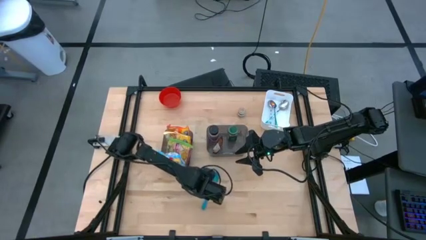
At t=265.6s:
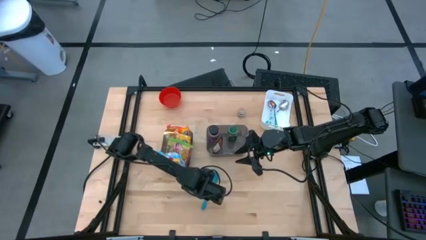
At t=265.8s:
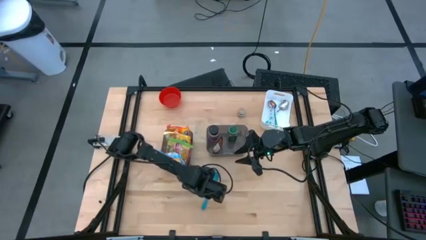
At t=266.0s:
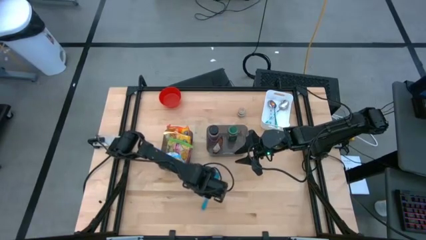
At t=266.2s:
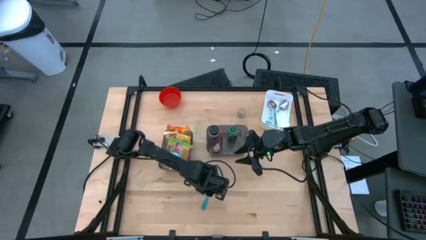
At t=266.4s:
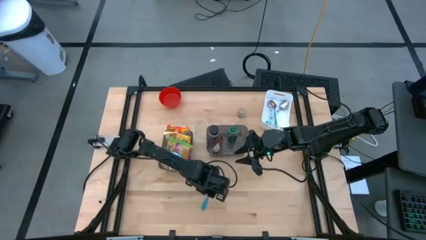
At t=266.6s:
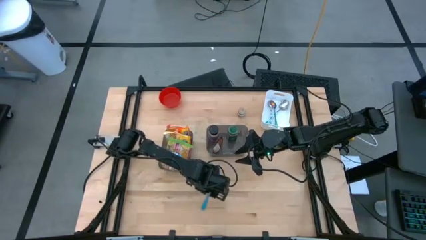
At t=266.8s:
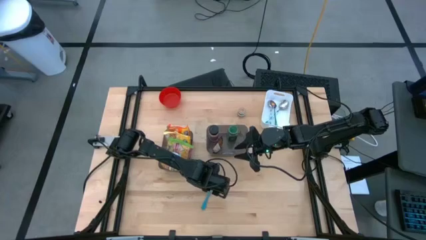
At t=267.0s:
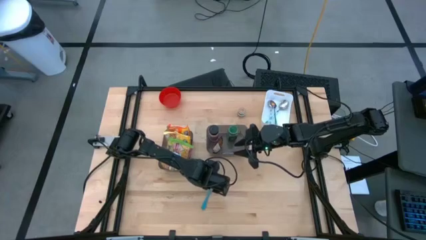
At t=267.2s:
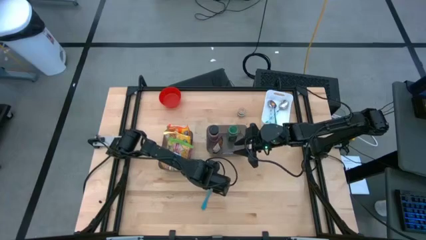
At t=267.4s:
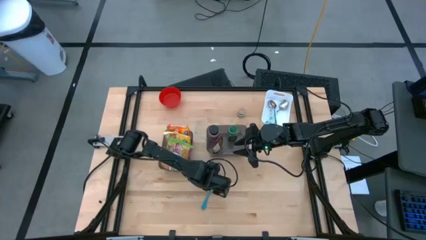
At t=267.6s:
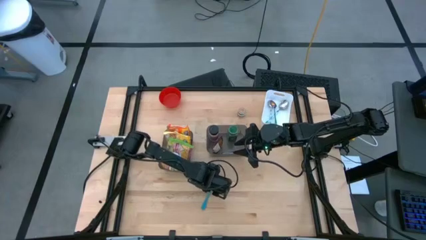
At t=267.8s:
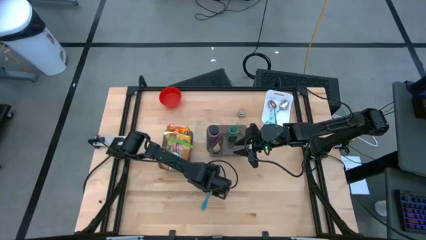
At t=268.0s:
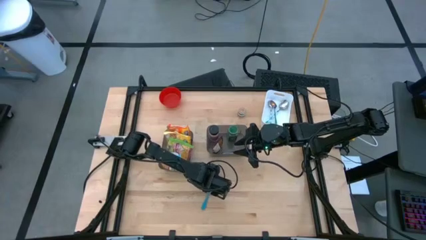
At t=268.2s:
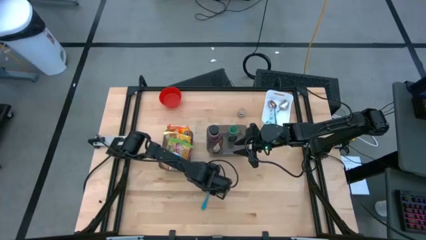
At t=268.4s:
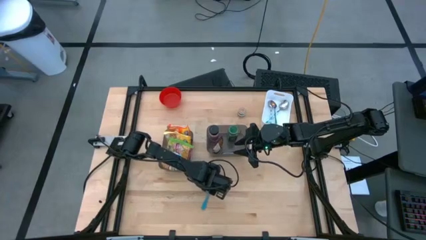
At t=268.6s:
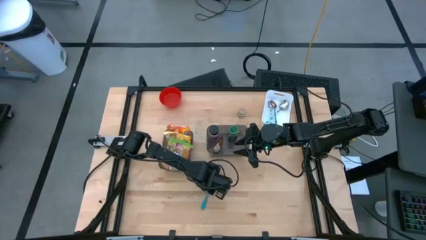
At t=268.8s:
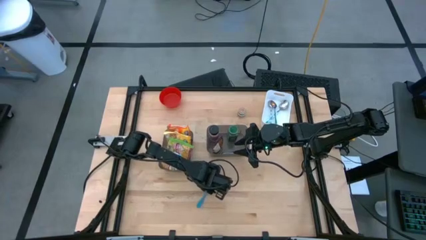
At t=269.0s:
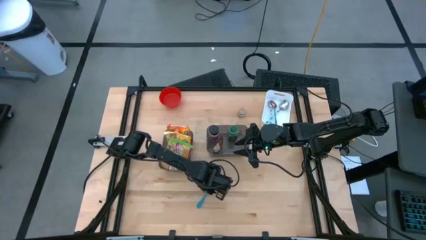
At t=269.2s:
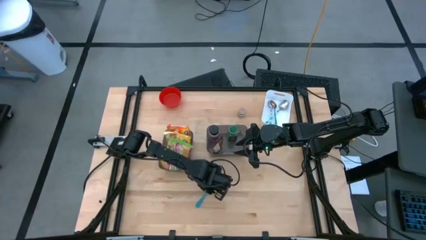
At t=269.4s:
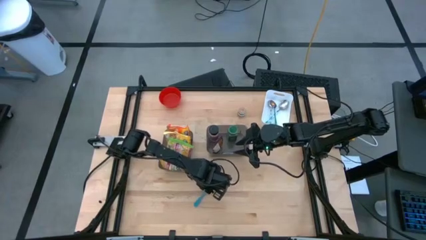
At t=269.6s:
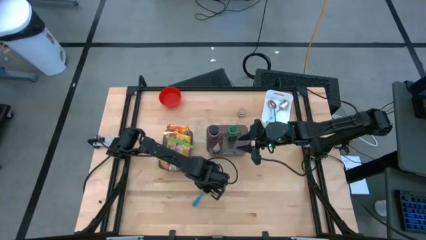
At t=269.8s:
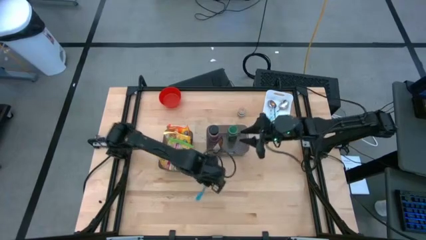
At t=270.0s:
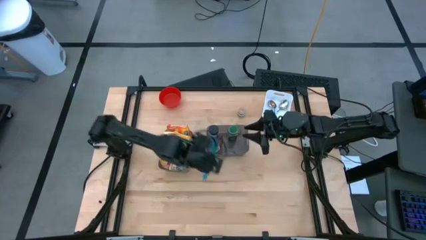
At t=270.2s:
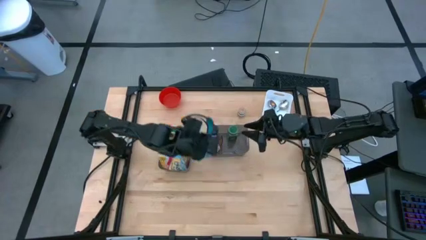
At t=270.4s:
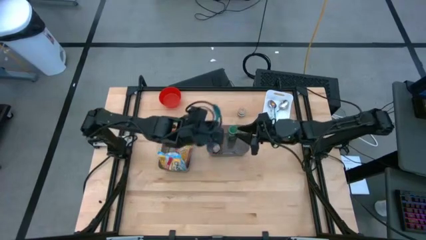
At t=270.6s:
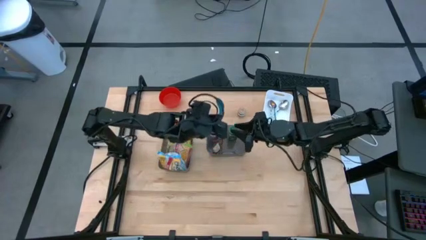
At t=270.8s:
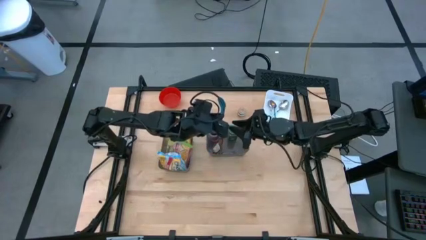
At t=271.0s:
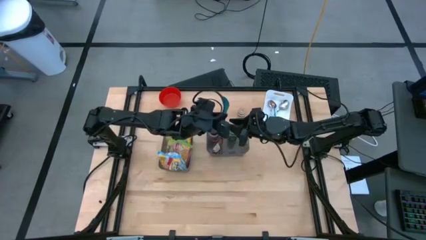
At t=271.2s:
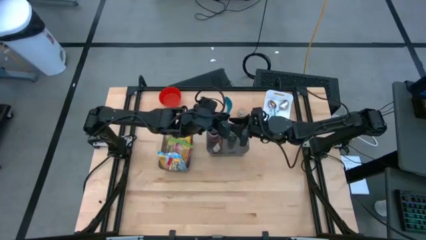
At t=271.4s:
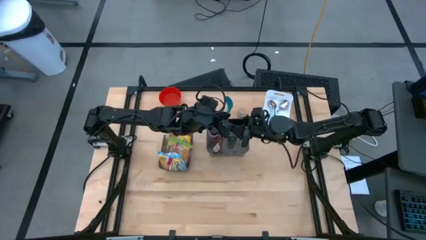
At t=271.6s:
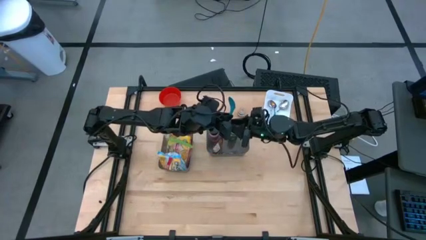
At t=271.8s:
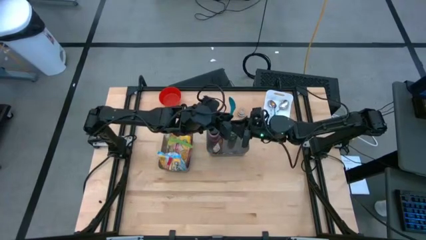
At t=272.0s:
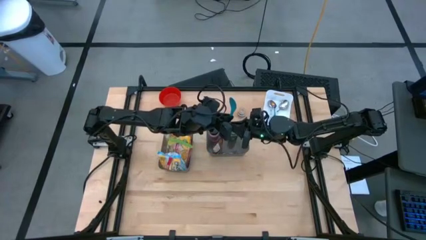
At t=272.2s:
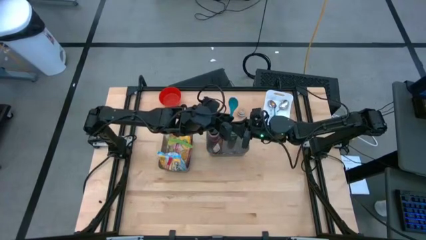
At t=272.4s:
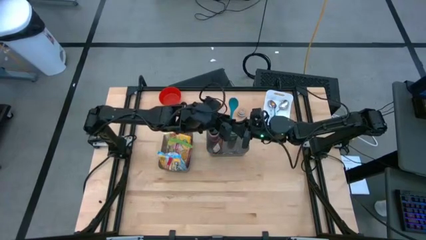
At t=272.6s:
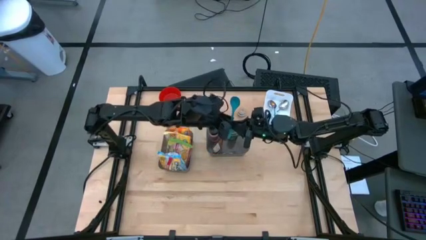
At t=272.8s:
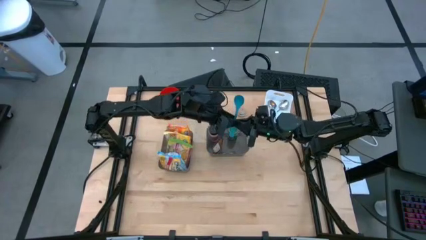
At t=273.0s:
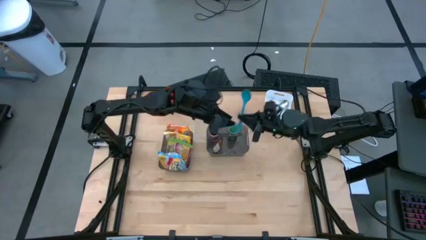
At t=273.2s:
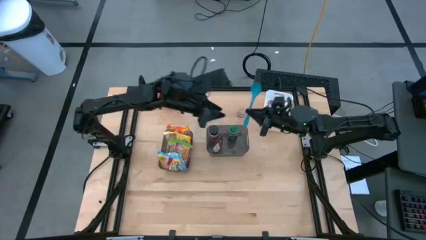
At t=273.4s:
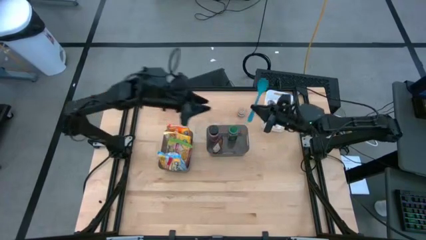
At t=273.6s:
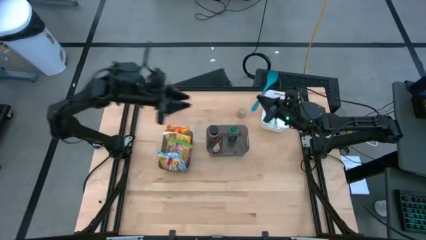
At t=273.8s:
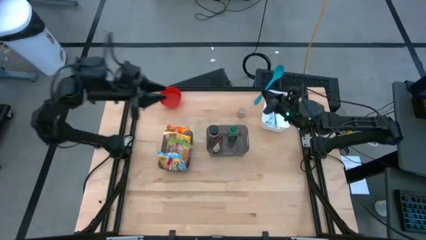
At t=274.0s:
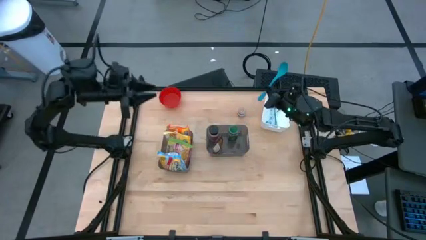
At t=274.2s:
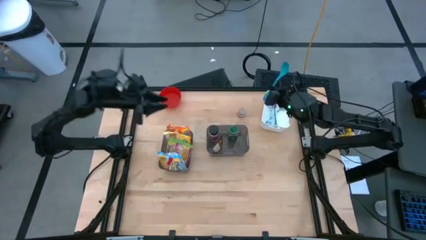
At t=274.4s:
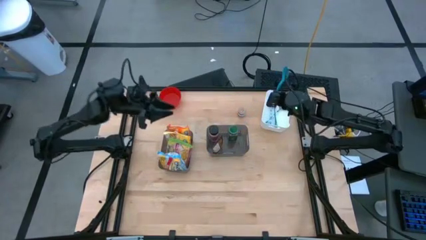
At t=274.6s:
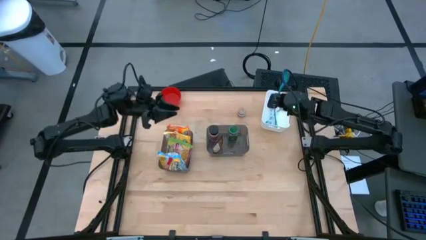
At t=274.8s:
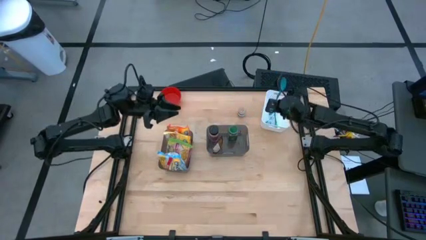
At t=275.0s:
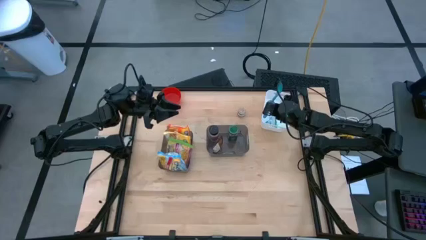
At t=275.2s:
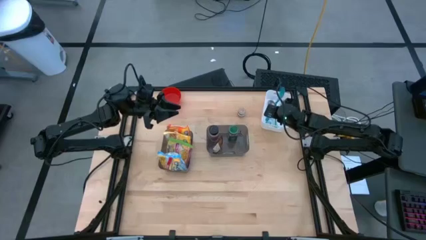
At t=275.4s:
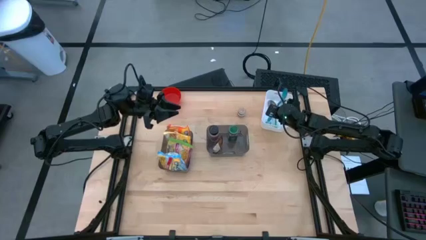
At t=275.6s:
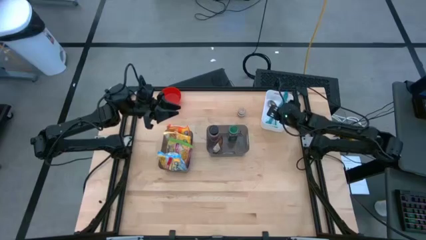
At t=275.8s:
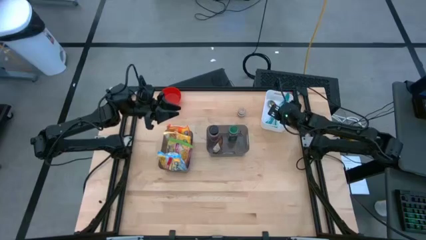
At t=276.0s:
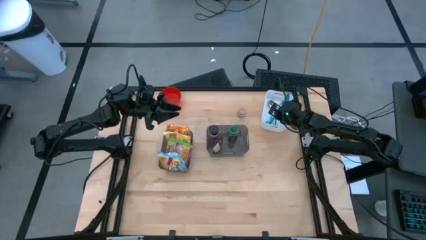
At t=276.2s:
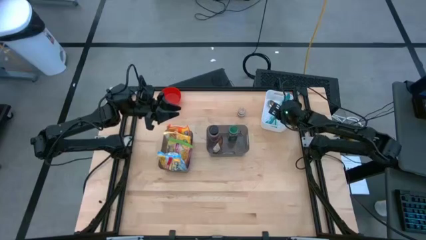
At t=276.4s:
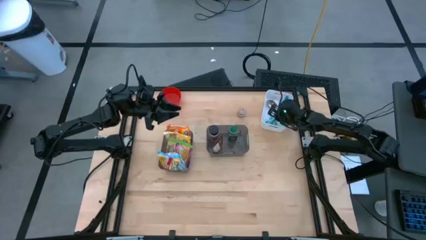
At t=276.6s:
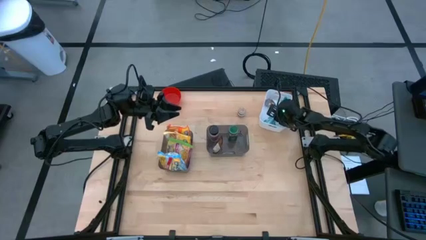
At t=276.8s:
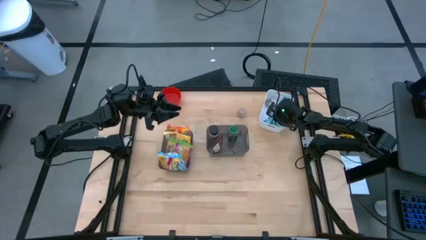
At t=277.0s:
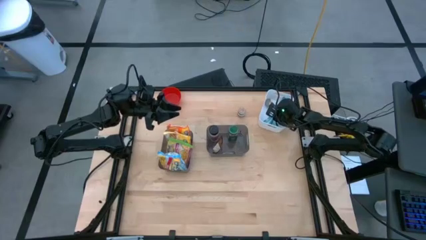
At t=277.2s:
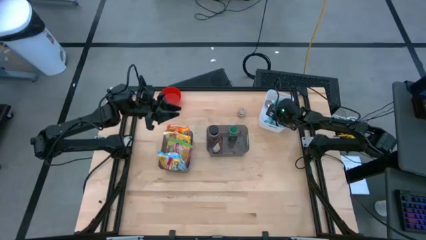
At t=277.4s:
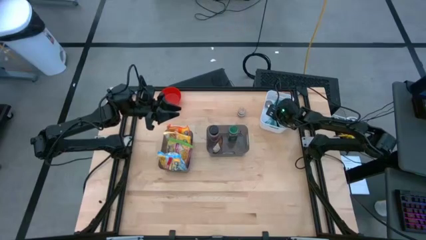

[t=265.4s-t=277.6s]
Task: Pick & Place Food Item
Put the blue baby spoon into the white bin
